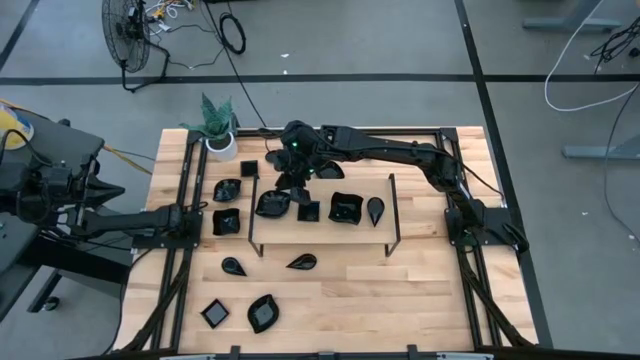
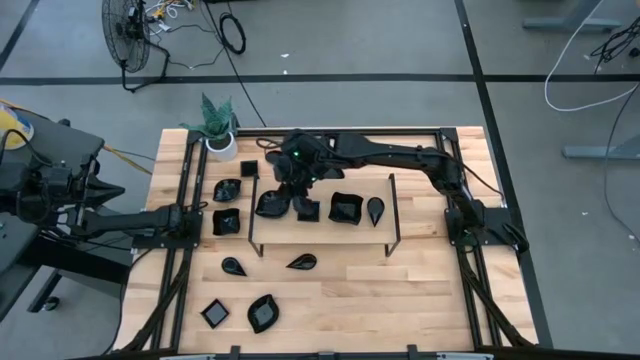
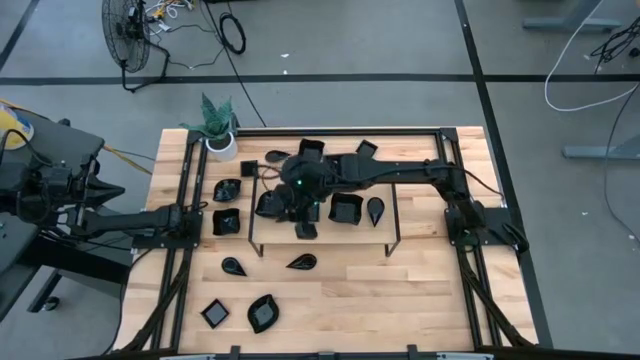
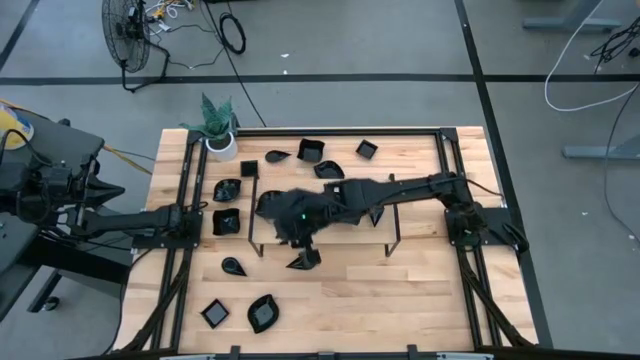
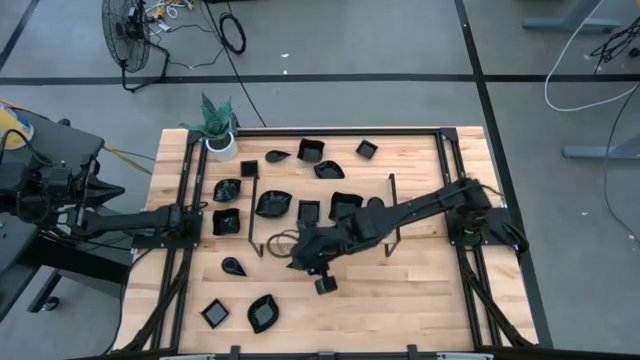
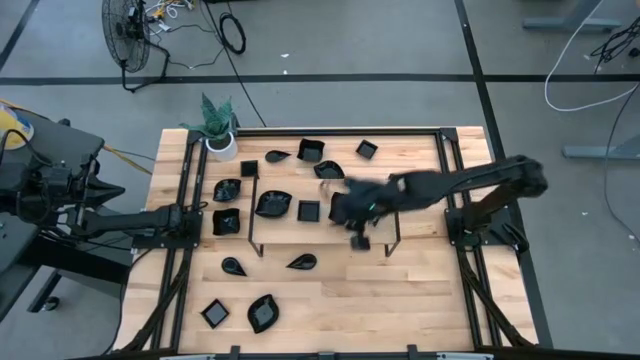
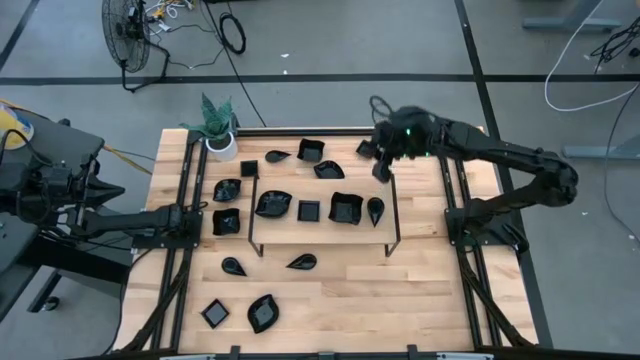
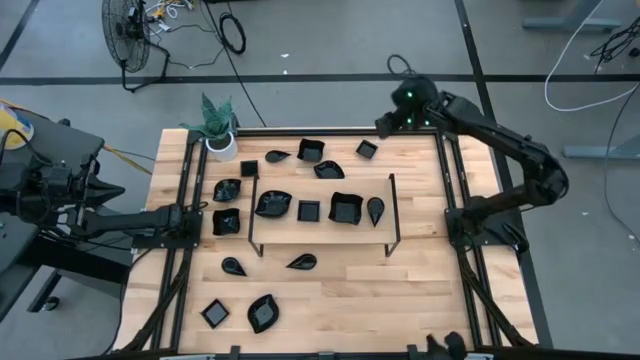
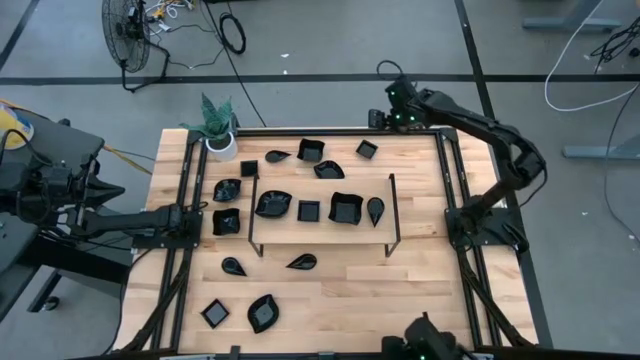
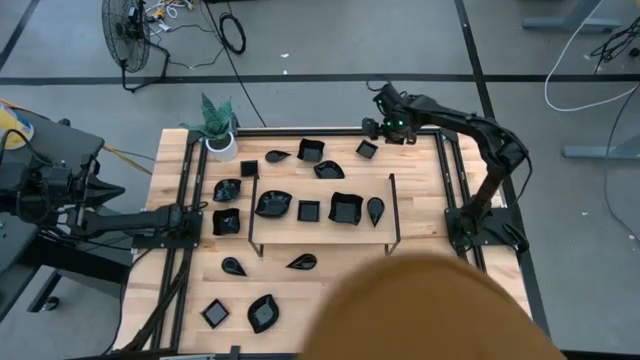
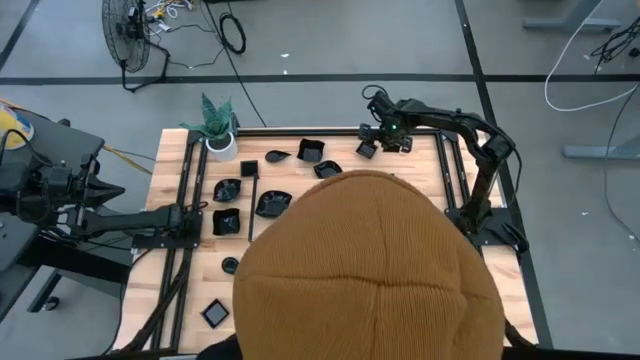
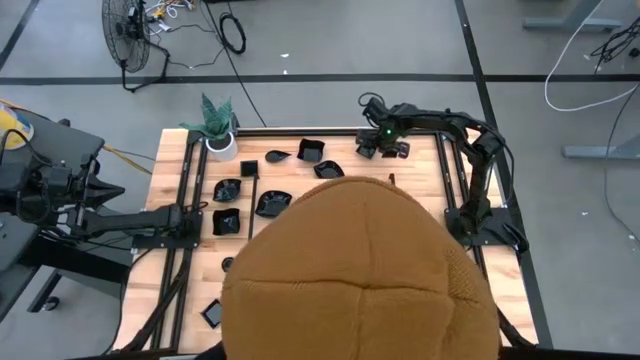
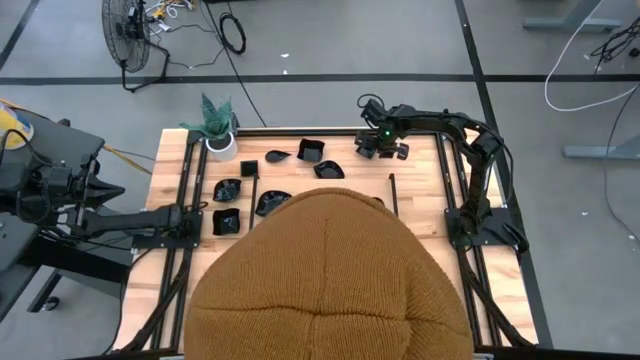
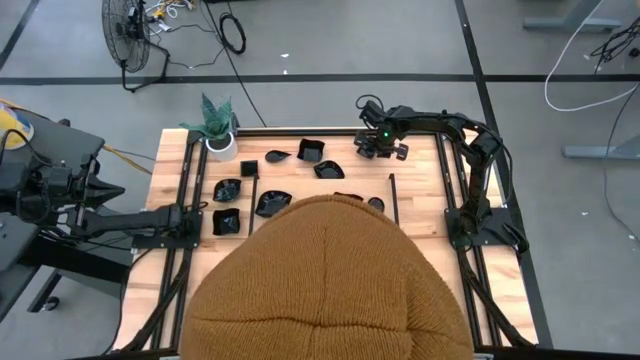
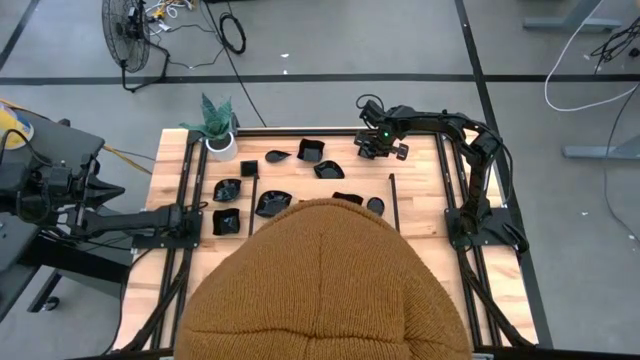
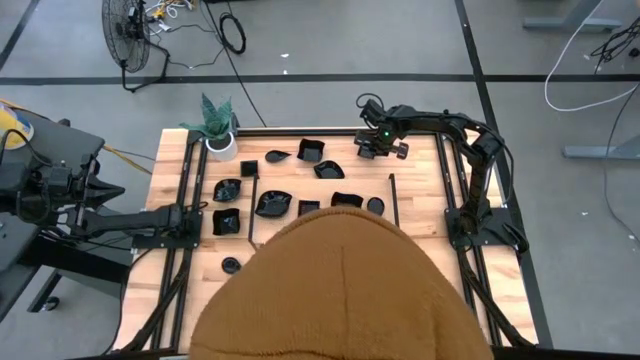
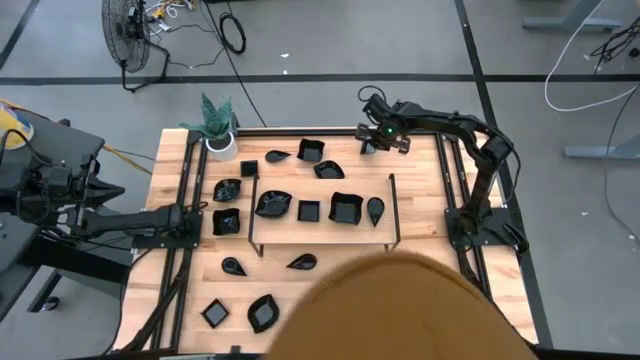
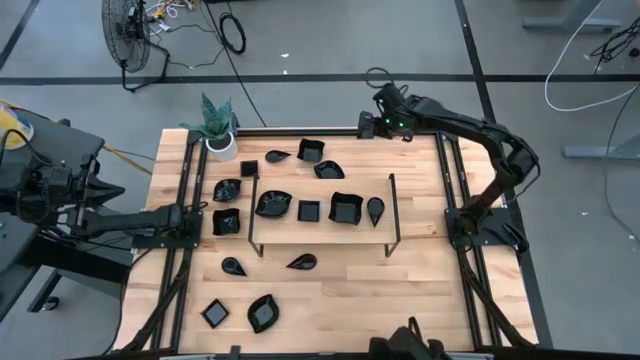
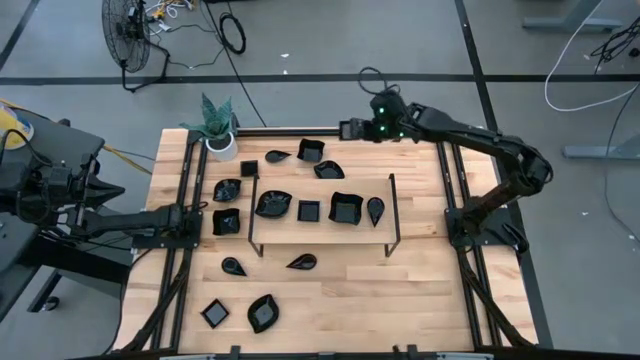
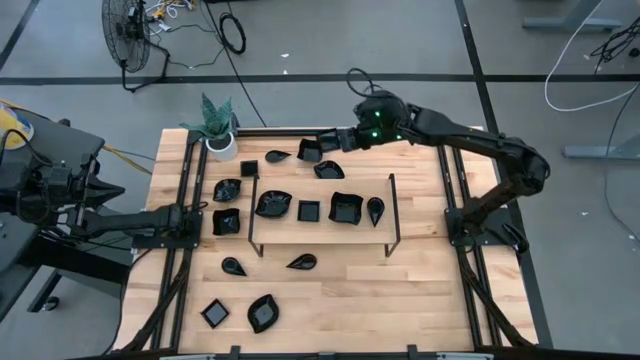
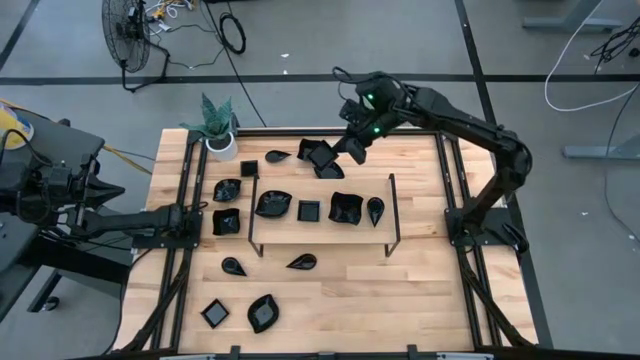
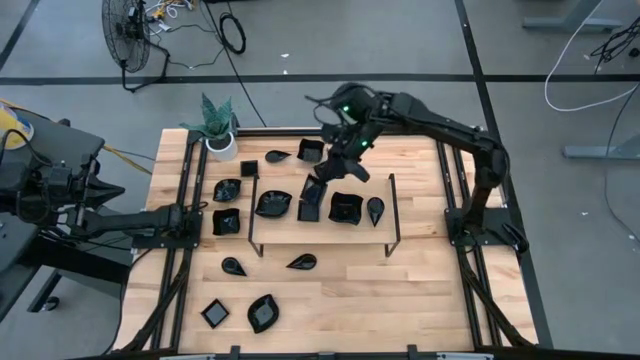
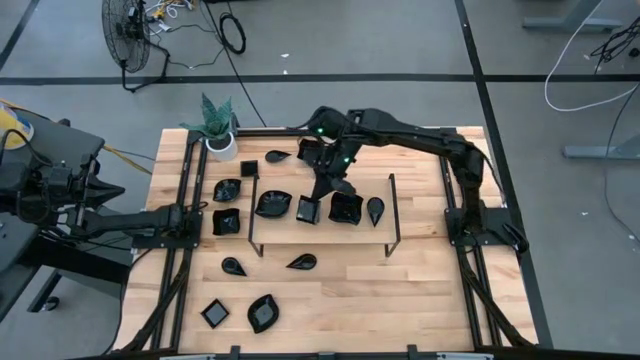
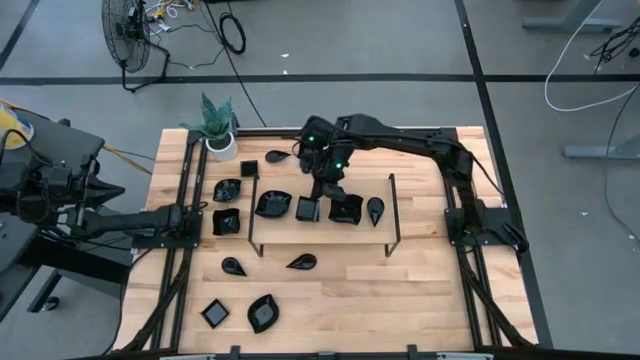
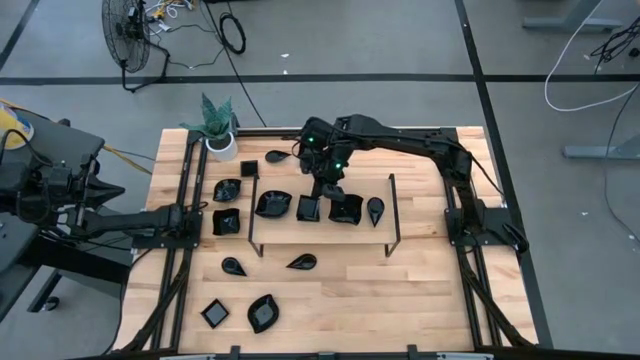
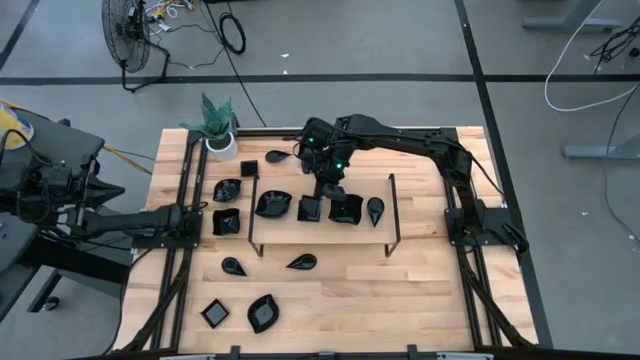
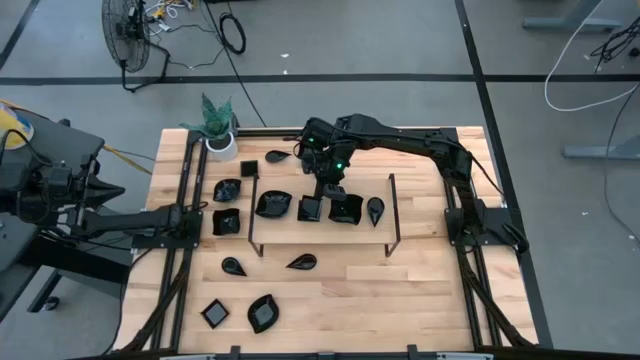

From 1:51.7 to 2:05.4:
Task: Pick & Place Mini shaped plates
Stack the square plate on top of the square plate on the shelf

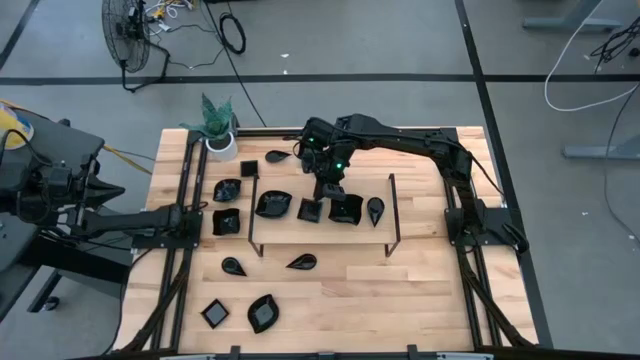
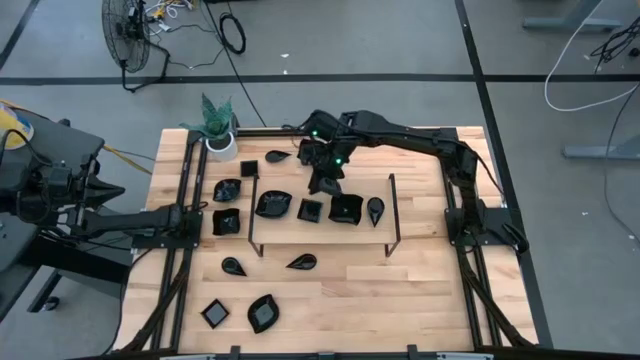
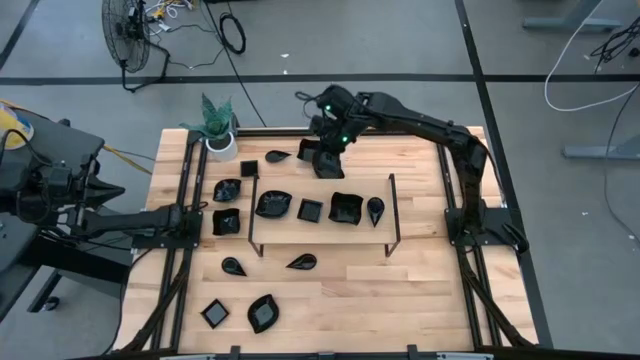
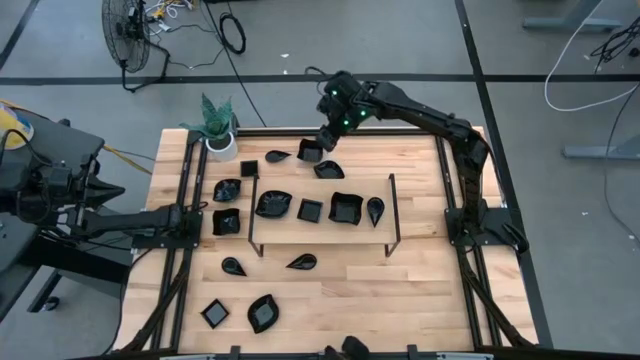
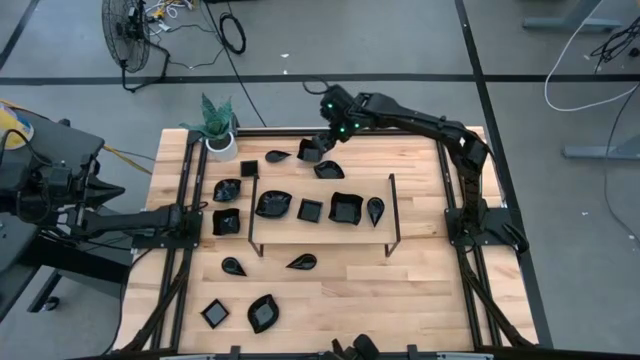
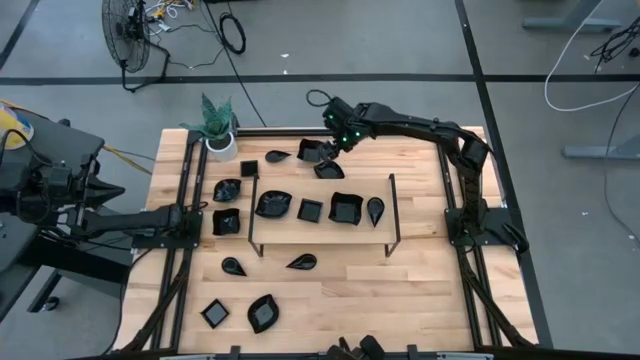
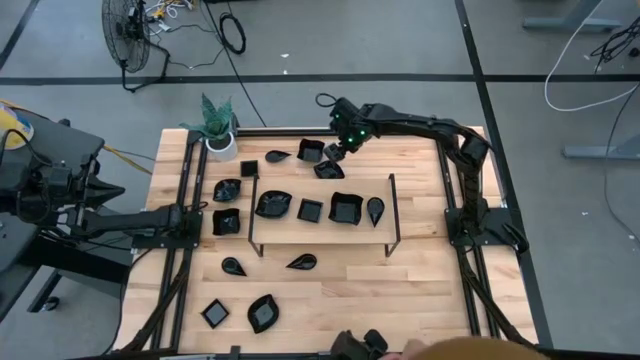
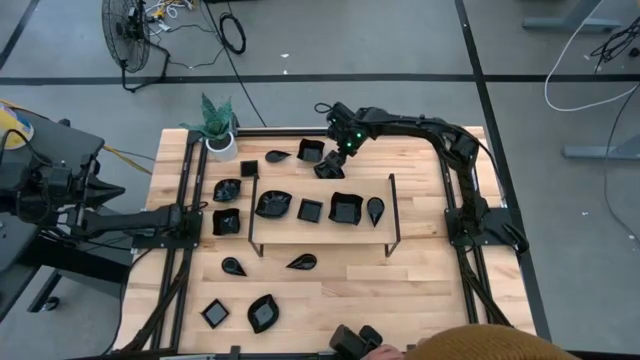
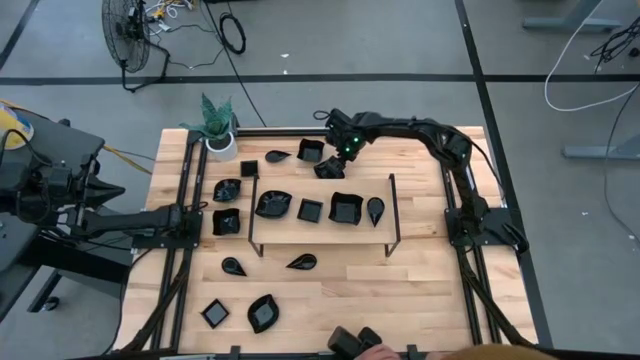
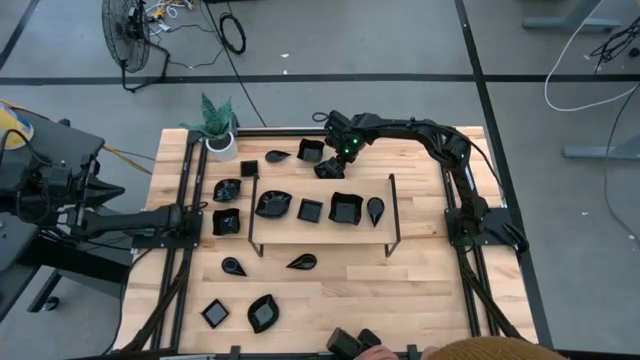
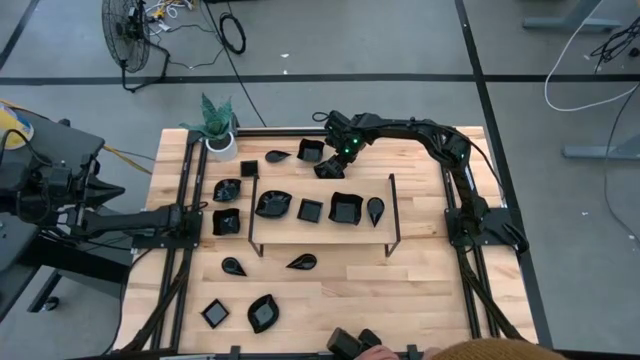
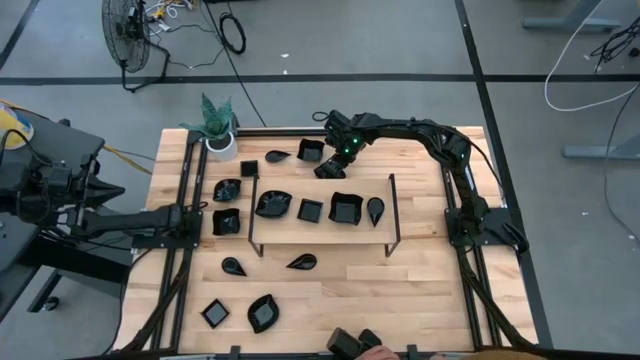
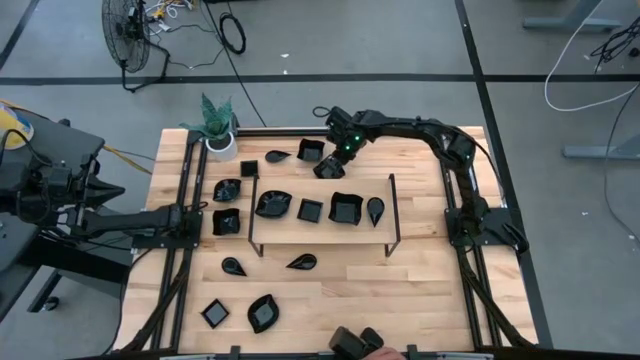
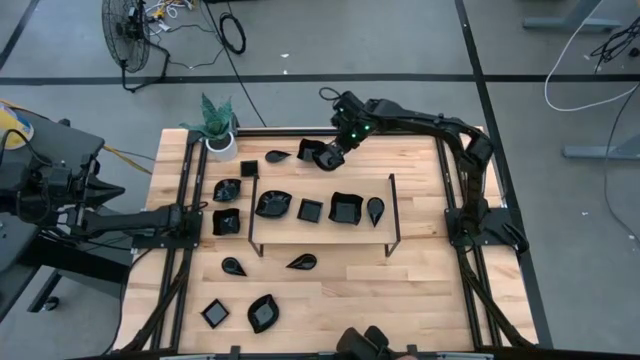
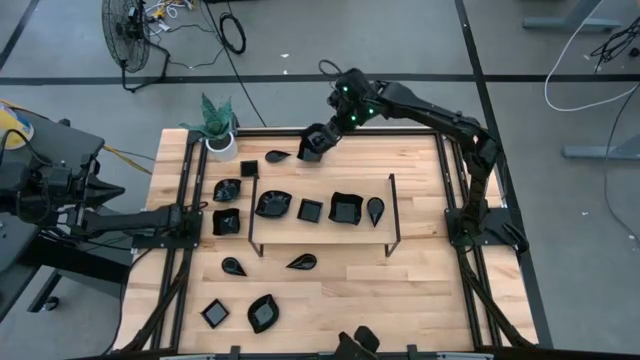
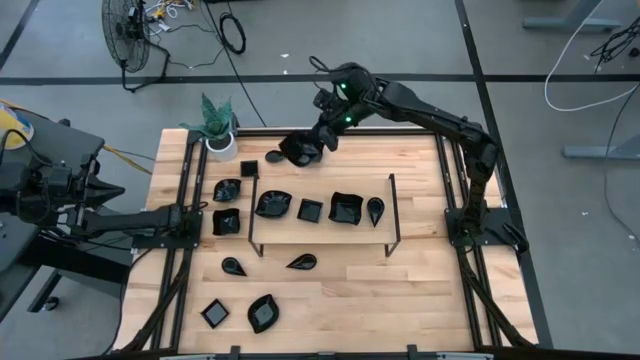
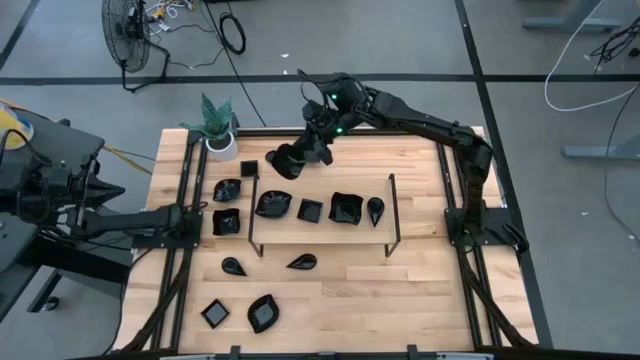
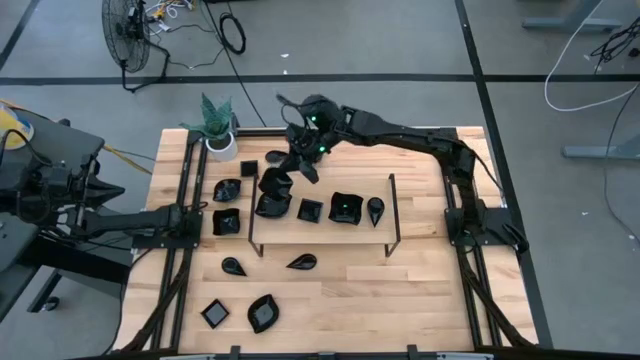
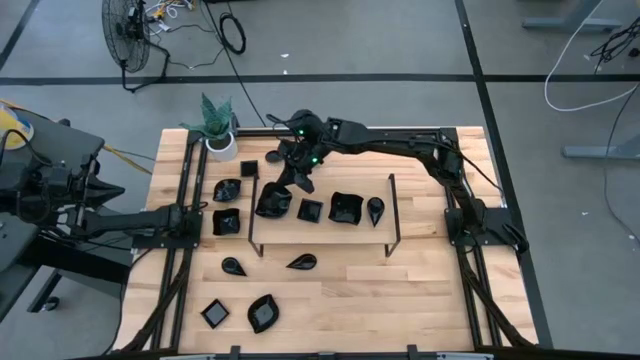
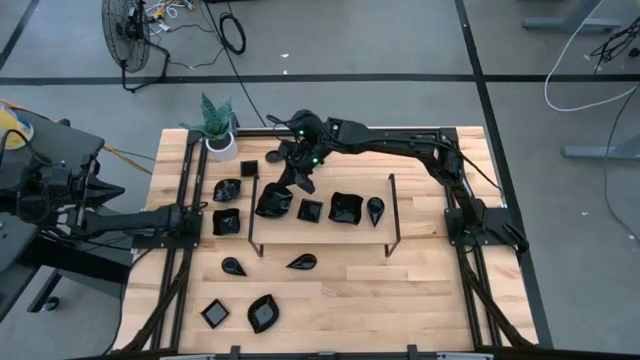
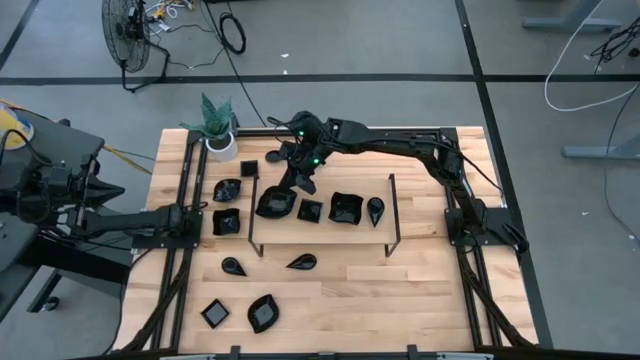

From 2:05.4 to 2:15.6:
Stack the leaf shaped plate on top of the leaf shaped plate on the shelf
